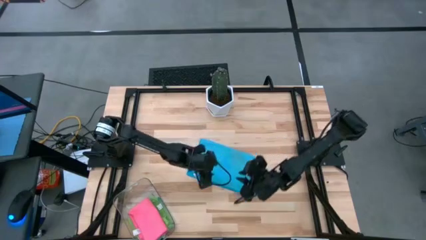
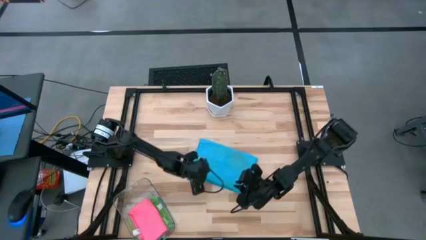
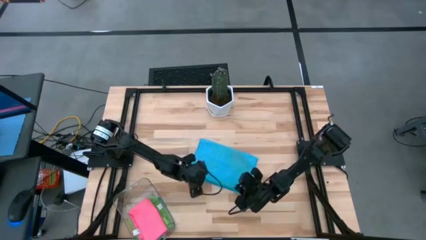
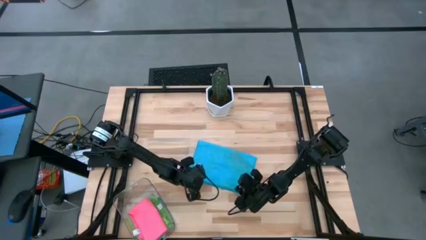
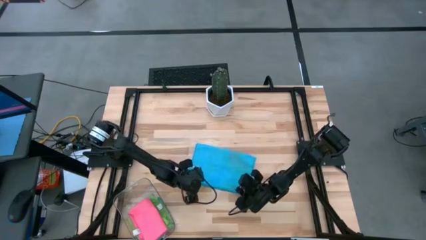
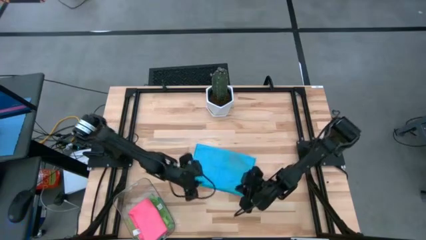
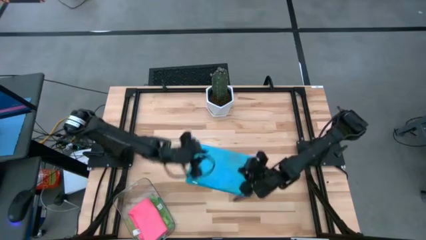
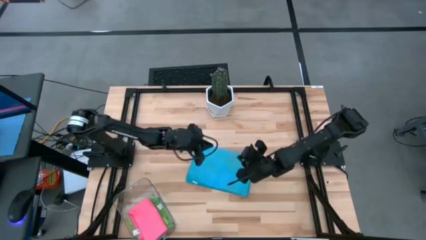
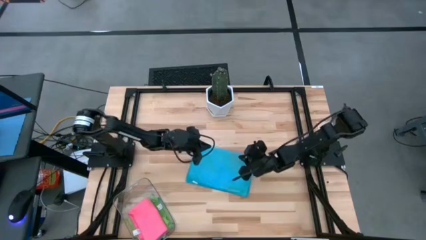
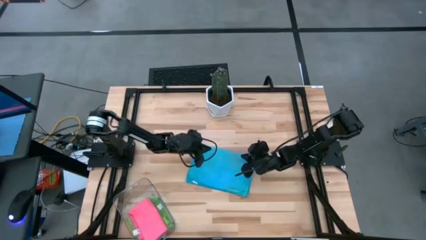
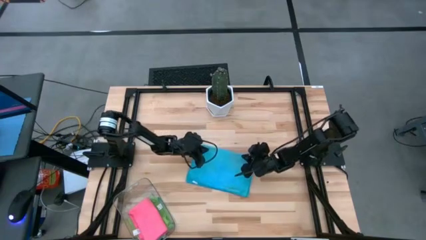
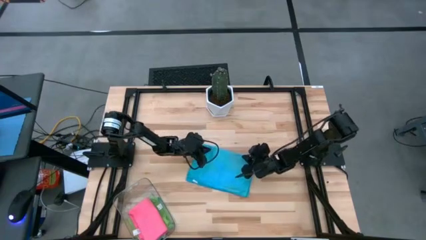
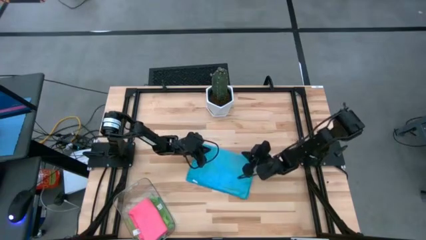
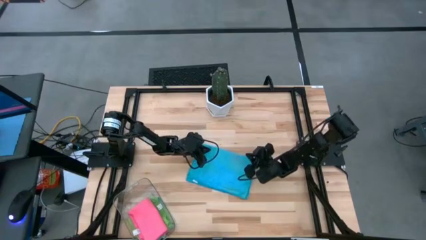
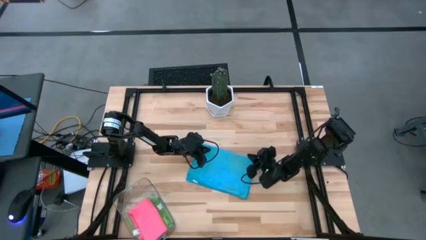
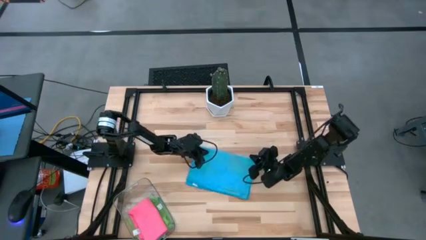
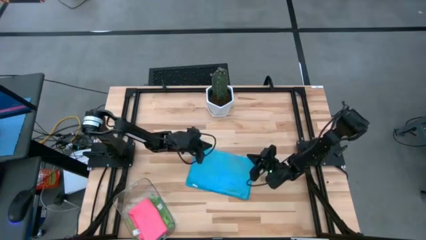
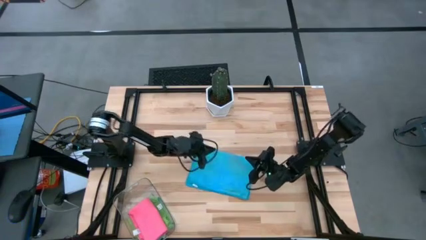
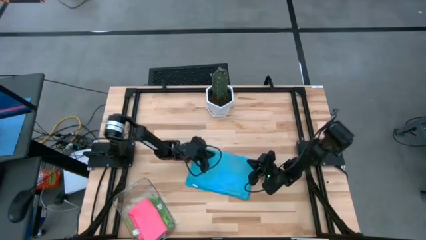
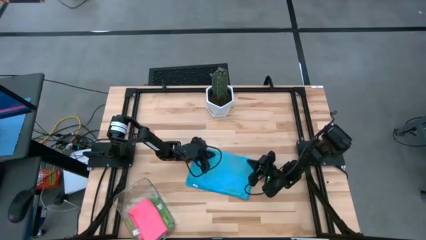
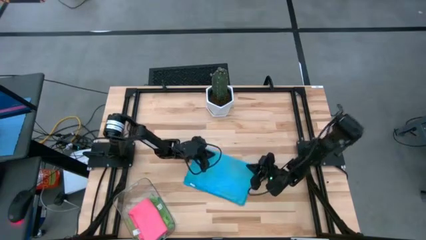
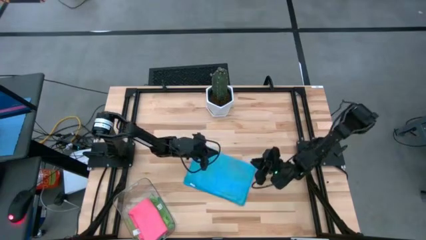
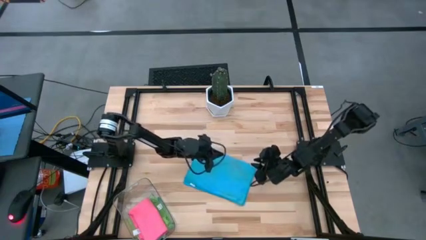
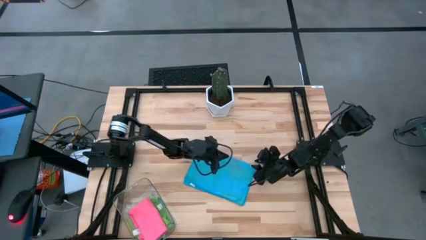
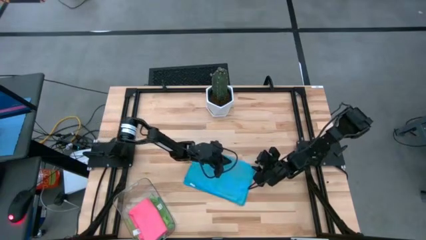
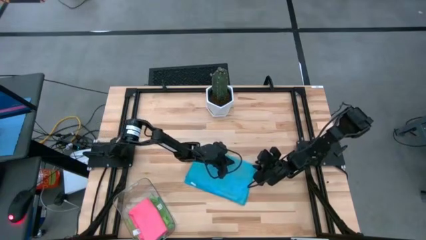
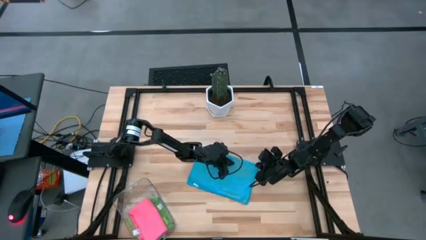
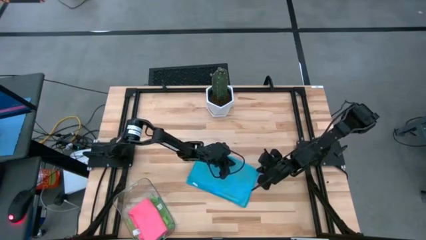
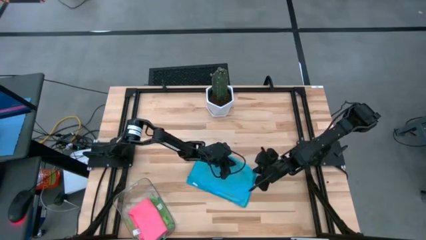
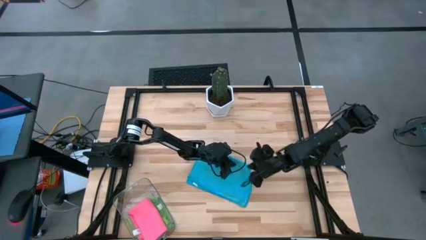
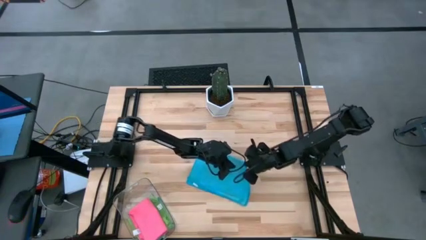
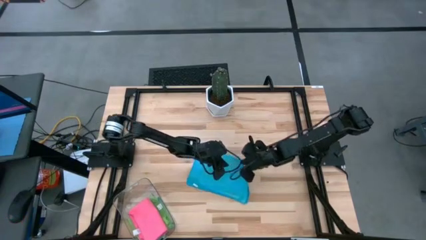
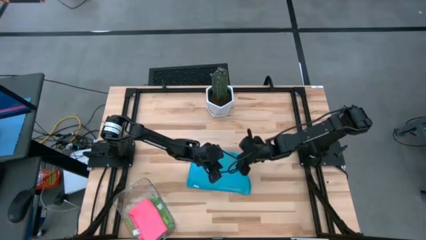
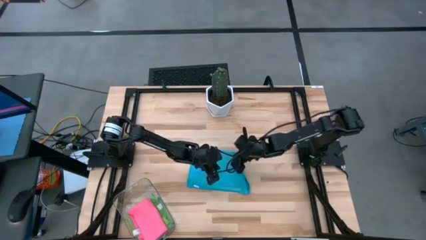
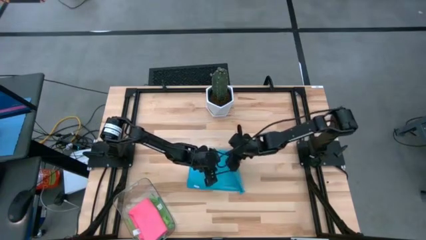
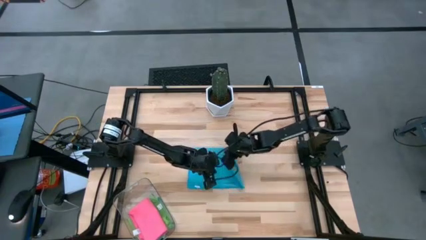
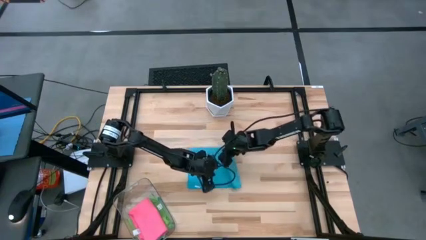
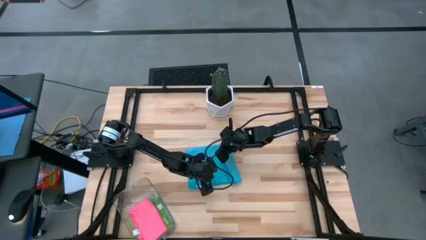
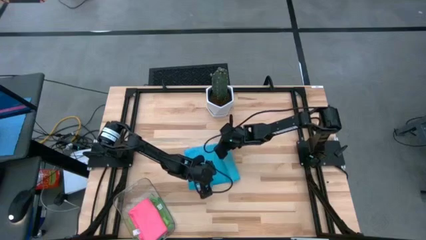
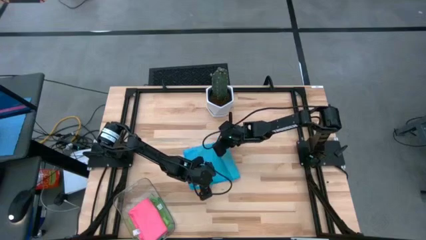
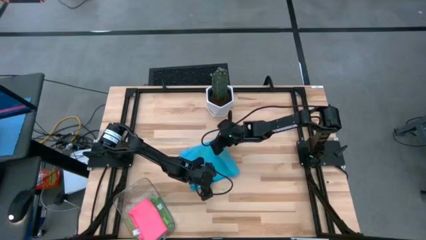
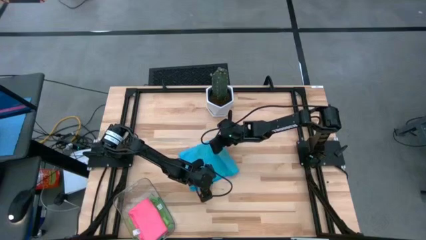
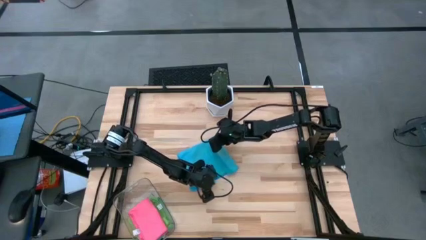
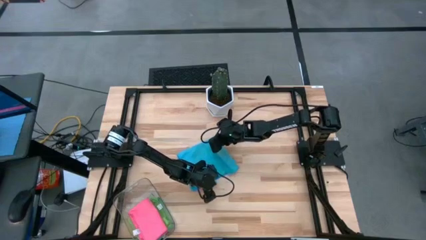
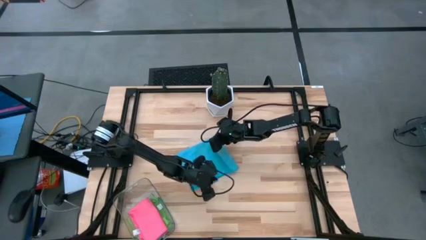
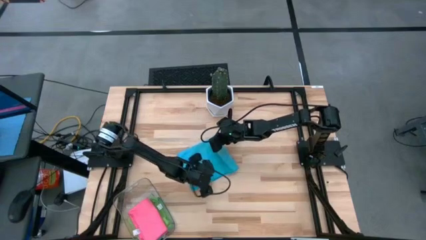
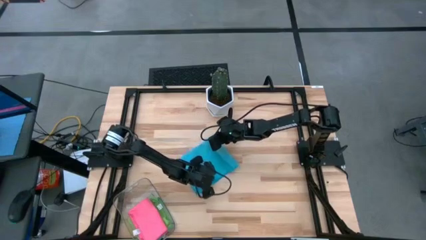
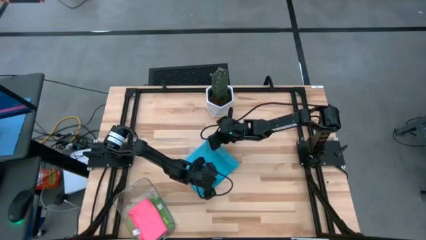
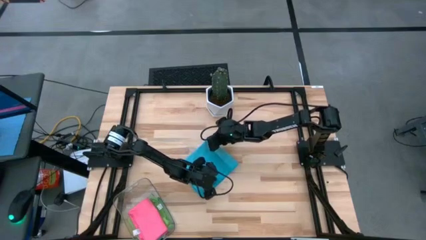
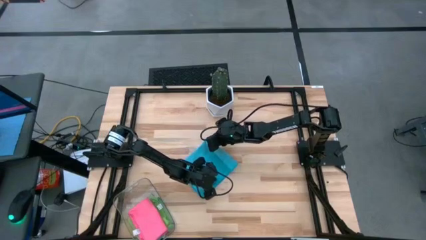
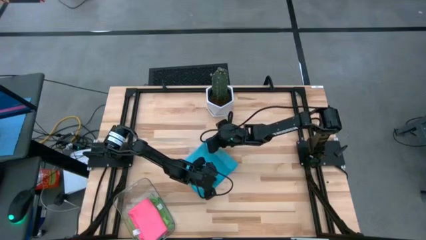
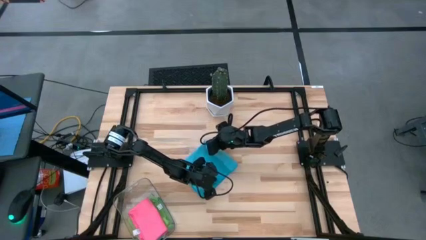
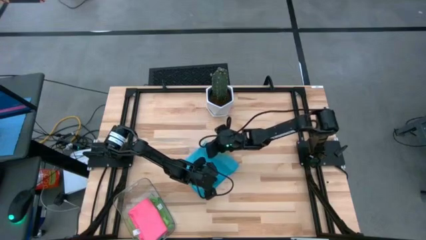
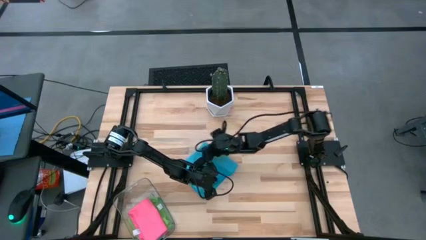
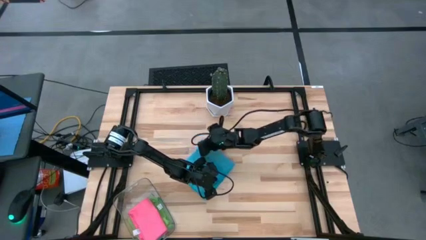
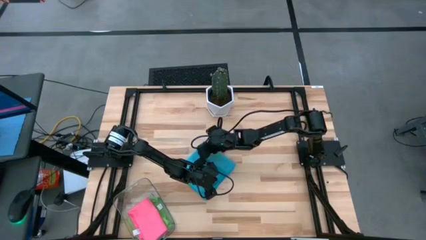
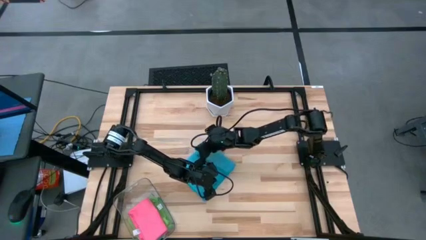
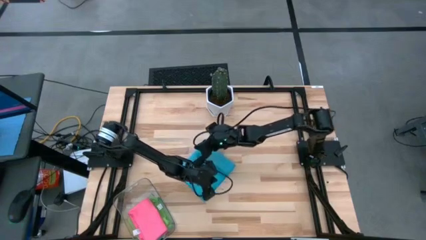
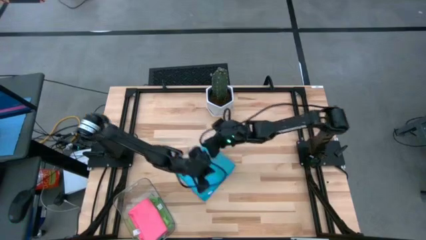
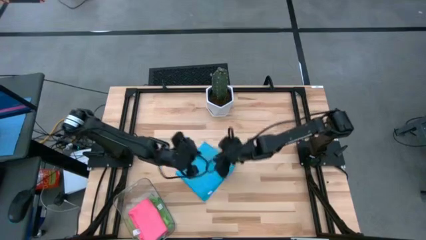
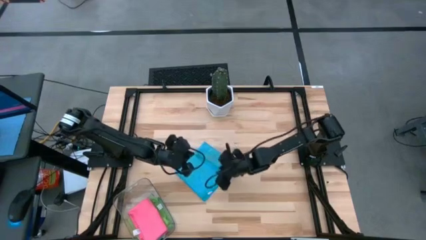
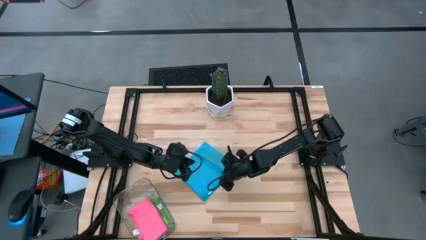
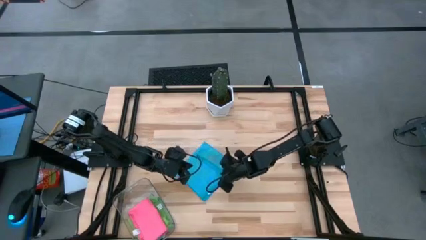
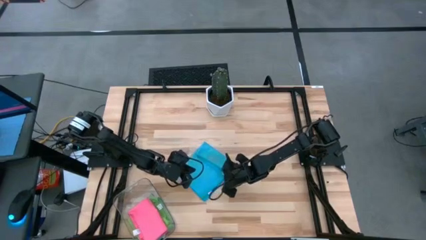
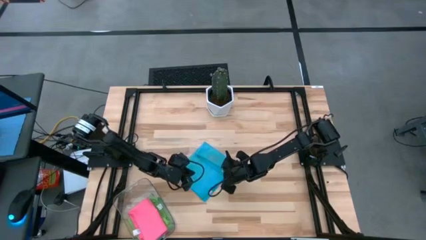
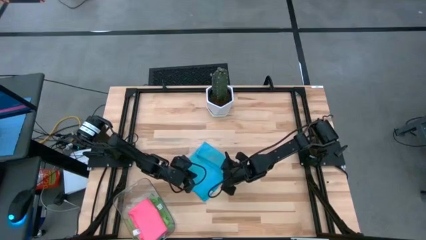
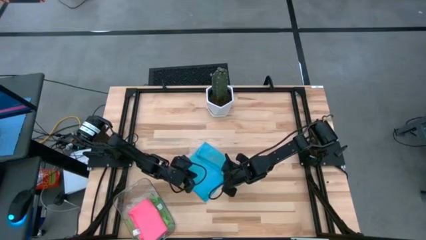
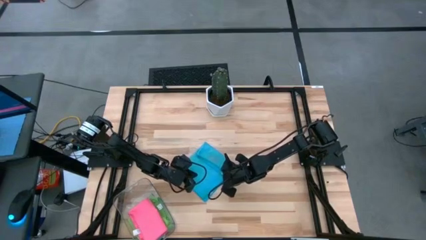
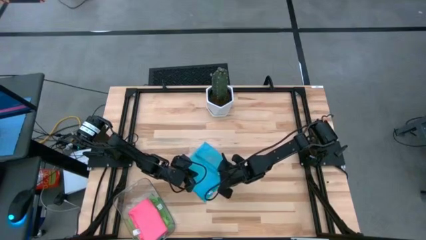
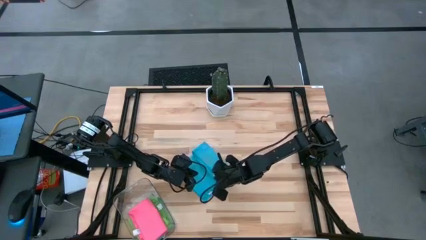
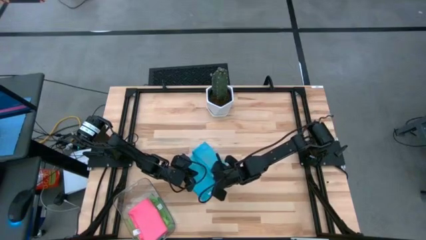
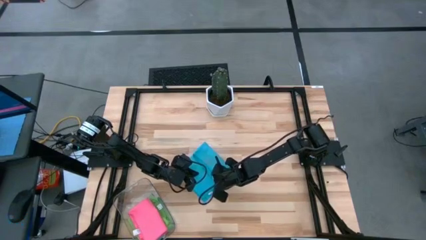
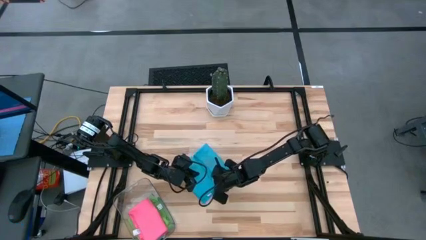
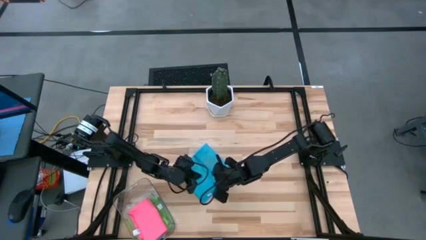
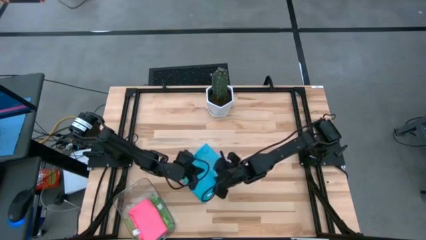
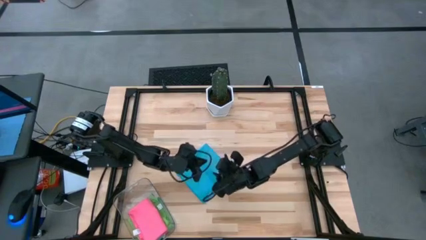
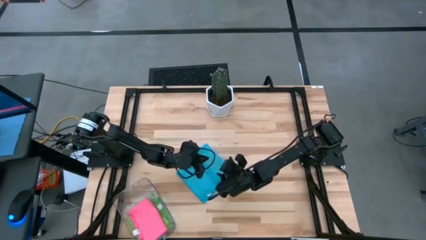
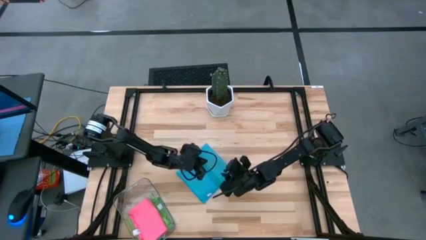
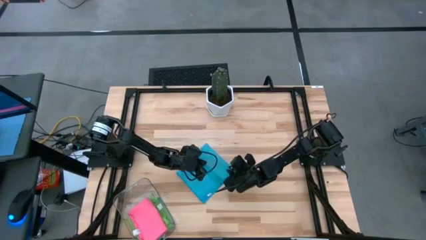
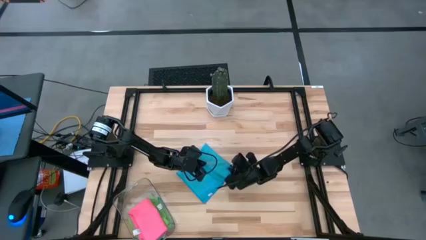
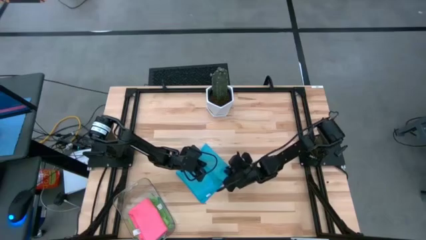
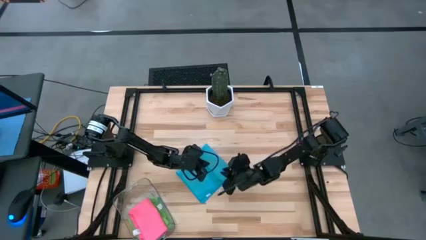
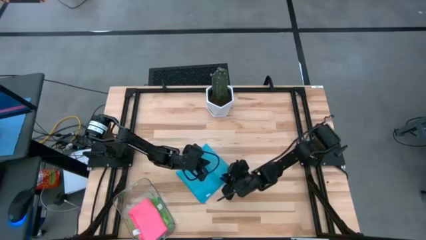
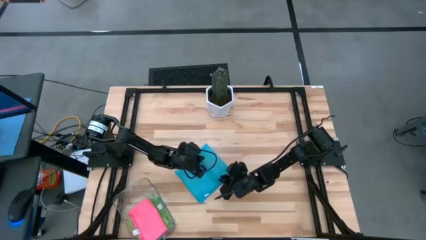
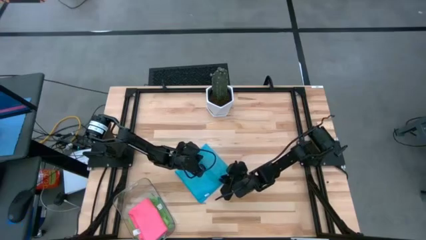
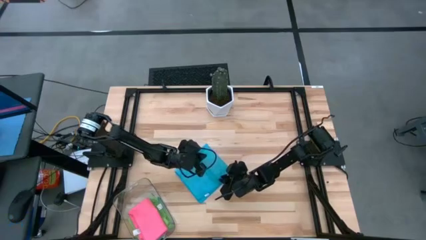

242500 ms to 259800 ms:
Task: Fold microfiber towels
Fold the blue microfiber towel
